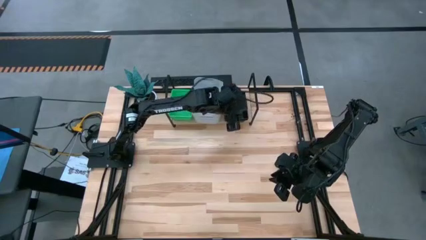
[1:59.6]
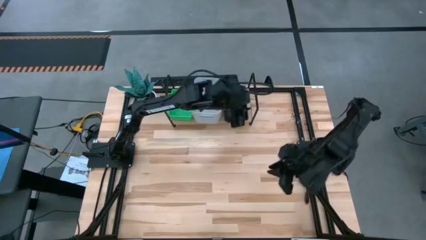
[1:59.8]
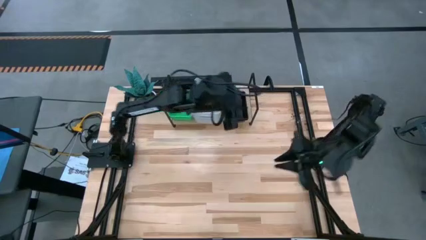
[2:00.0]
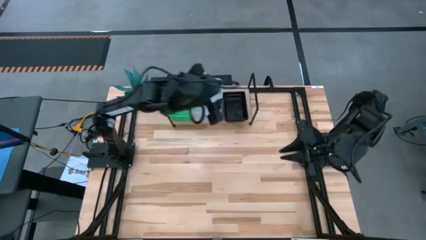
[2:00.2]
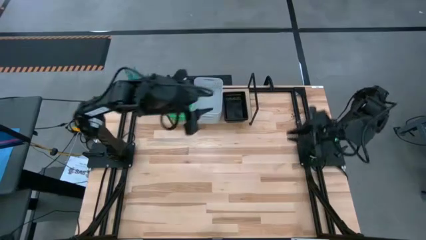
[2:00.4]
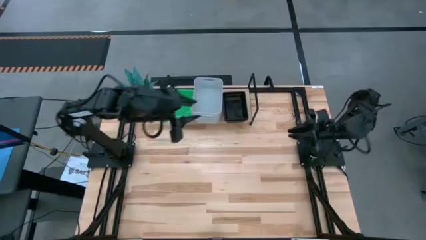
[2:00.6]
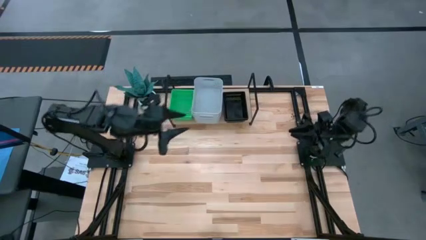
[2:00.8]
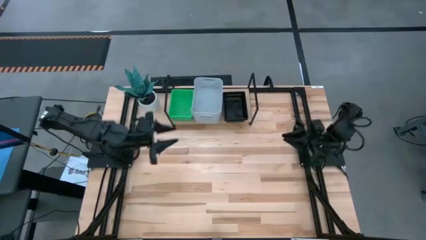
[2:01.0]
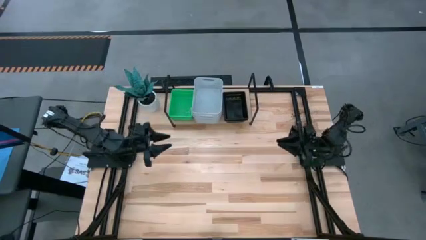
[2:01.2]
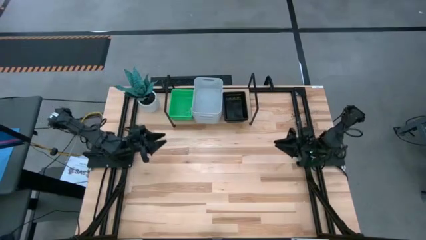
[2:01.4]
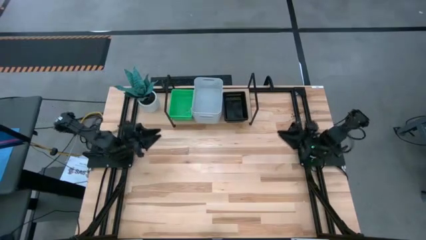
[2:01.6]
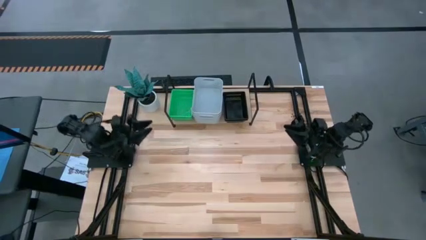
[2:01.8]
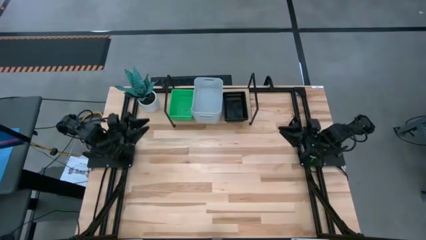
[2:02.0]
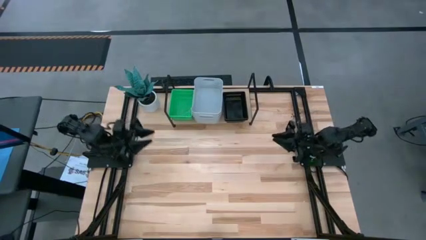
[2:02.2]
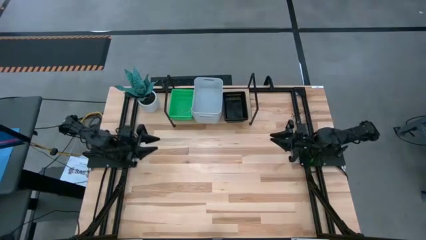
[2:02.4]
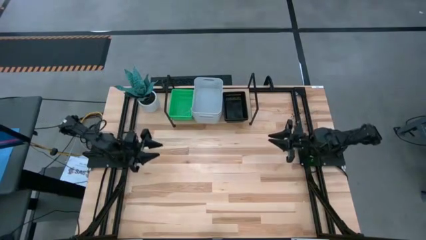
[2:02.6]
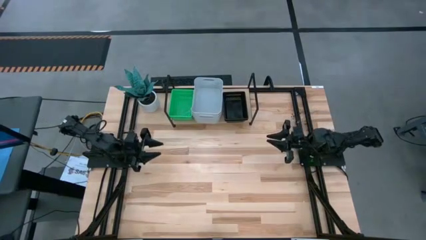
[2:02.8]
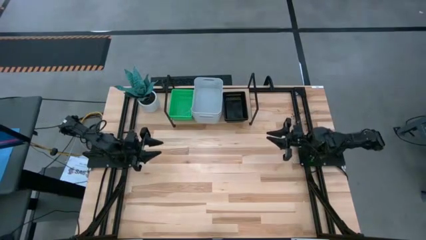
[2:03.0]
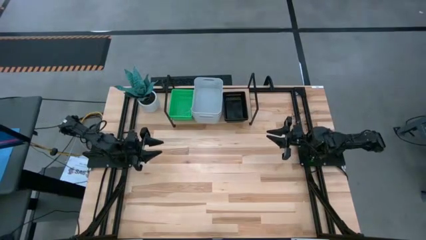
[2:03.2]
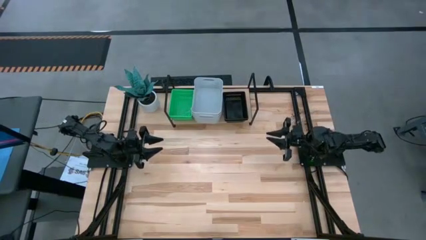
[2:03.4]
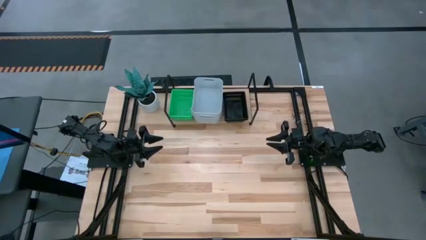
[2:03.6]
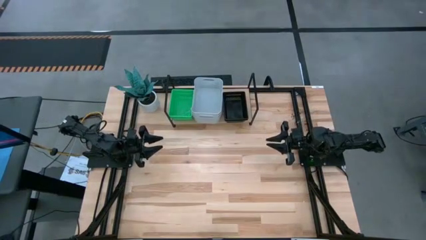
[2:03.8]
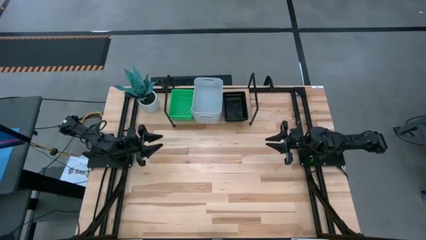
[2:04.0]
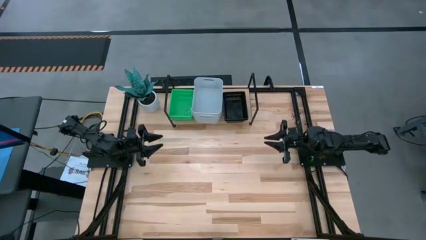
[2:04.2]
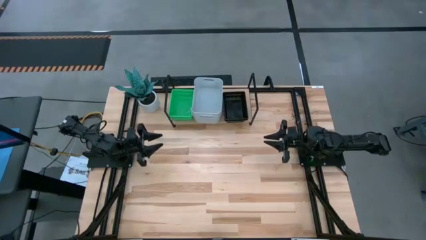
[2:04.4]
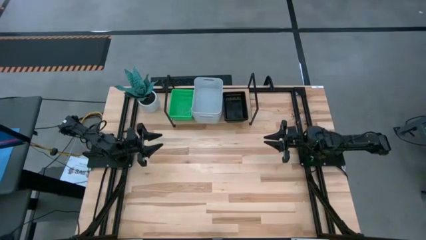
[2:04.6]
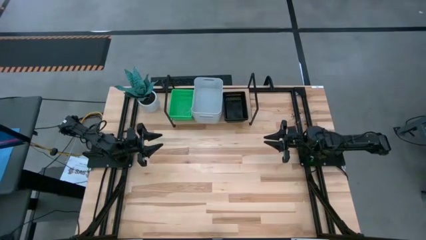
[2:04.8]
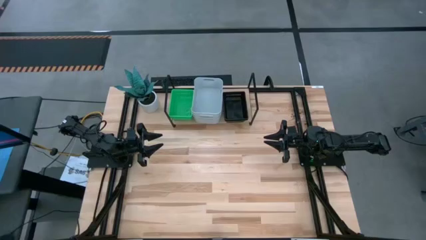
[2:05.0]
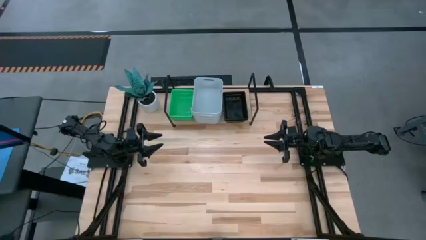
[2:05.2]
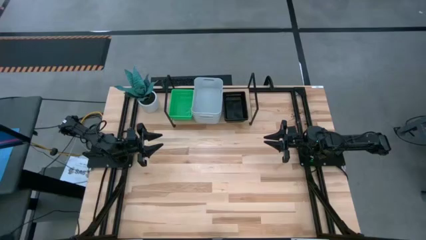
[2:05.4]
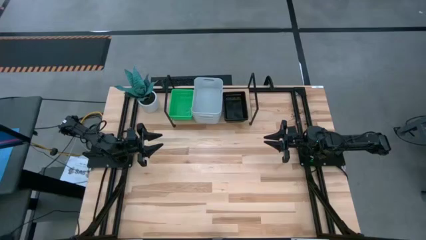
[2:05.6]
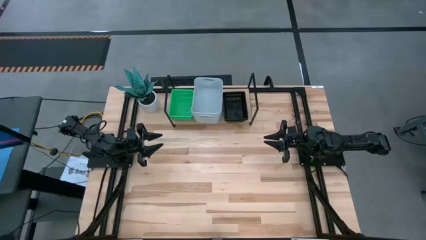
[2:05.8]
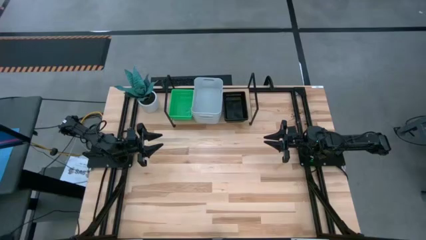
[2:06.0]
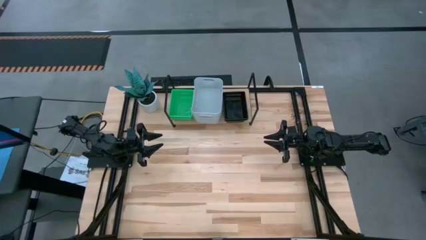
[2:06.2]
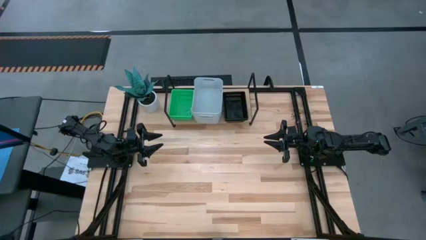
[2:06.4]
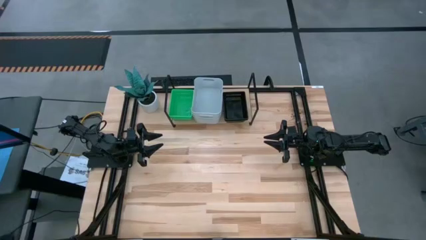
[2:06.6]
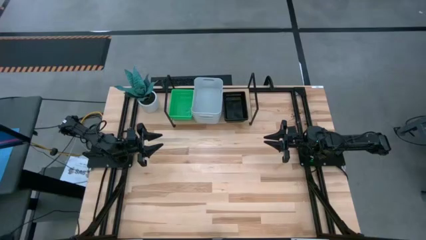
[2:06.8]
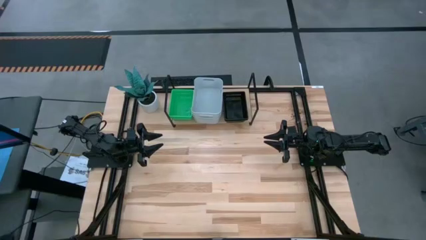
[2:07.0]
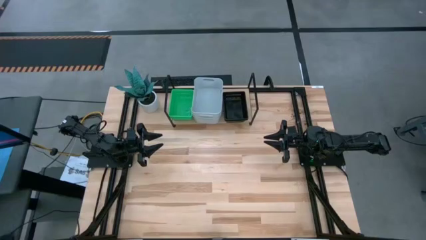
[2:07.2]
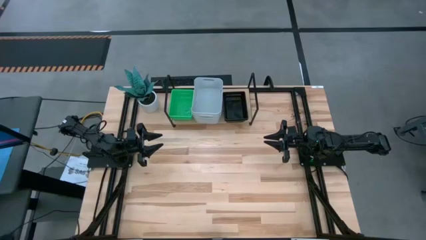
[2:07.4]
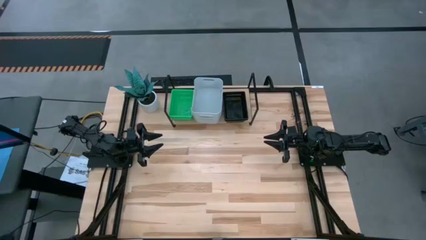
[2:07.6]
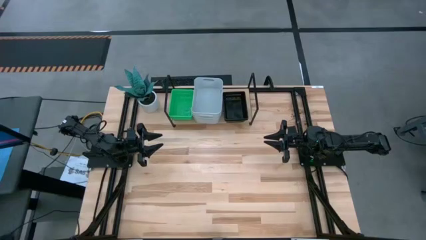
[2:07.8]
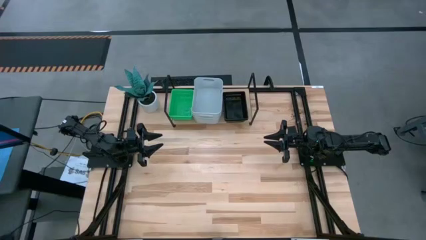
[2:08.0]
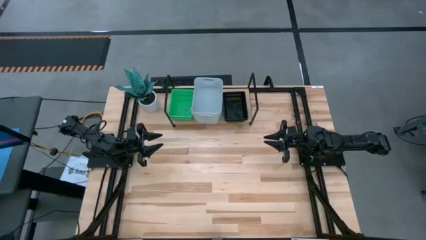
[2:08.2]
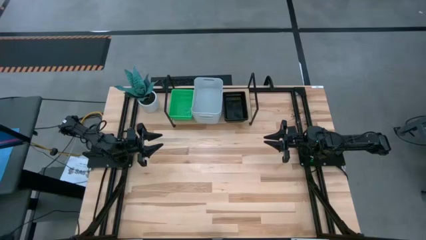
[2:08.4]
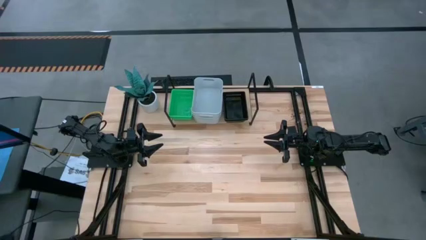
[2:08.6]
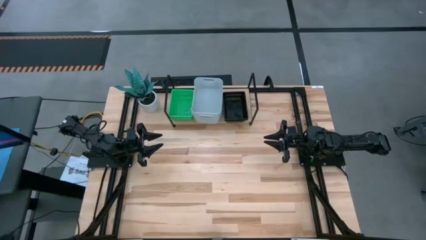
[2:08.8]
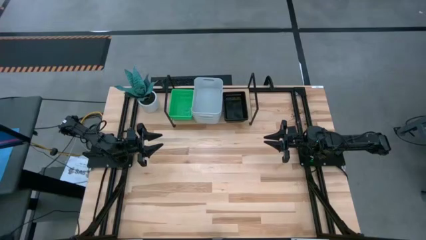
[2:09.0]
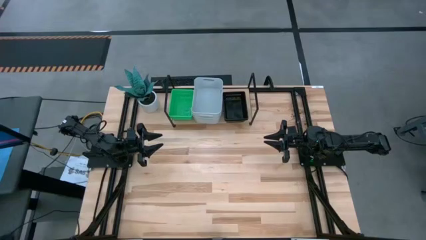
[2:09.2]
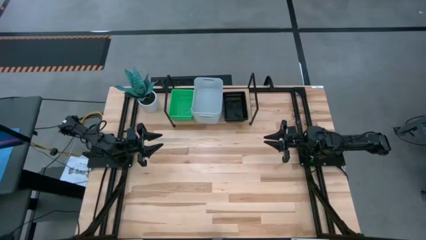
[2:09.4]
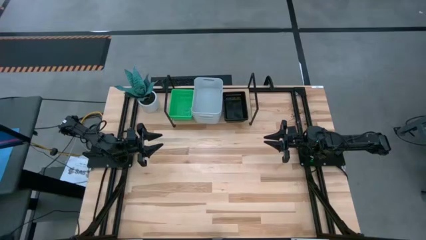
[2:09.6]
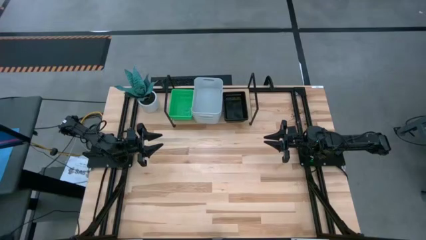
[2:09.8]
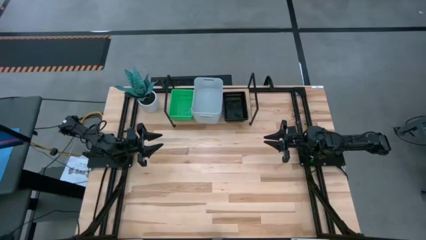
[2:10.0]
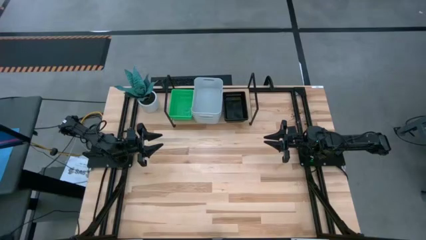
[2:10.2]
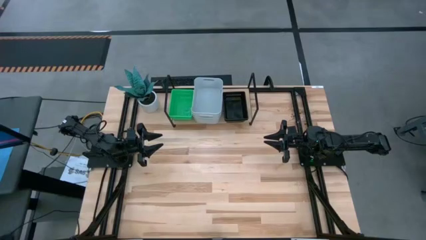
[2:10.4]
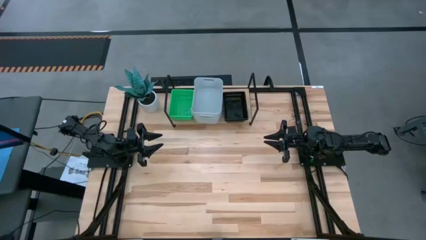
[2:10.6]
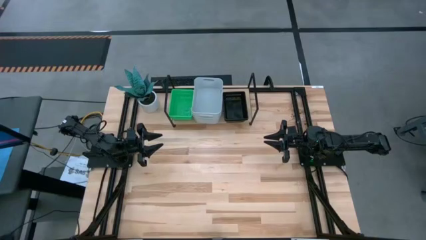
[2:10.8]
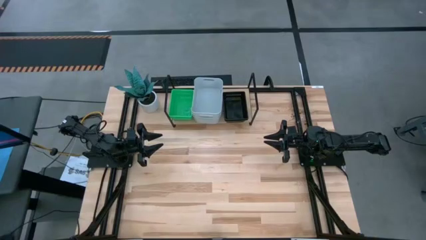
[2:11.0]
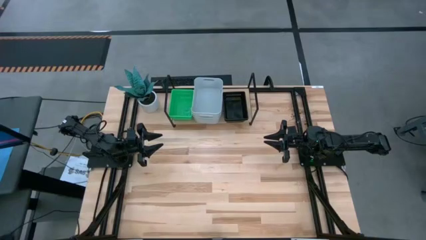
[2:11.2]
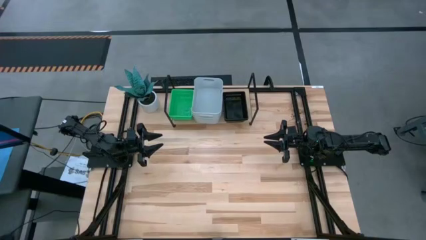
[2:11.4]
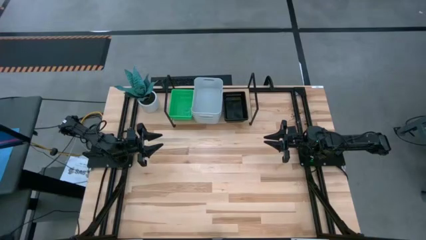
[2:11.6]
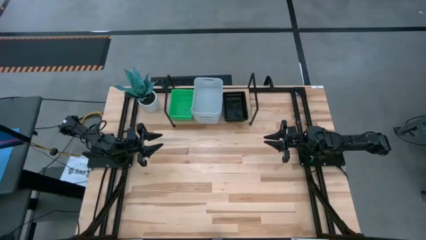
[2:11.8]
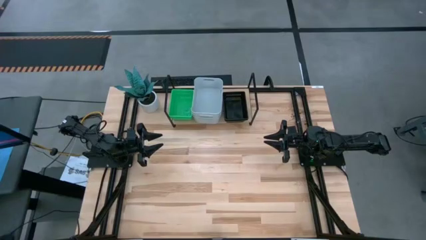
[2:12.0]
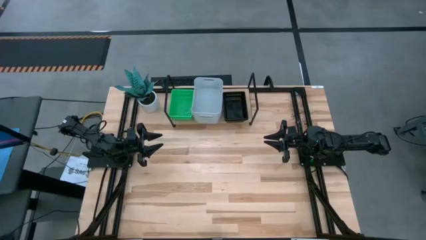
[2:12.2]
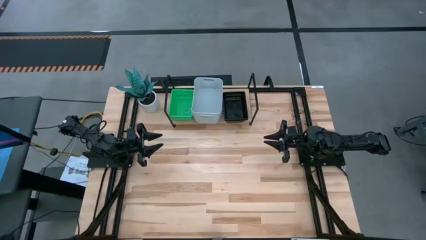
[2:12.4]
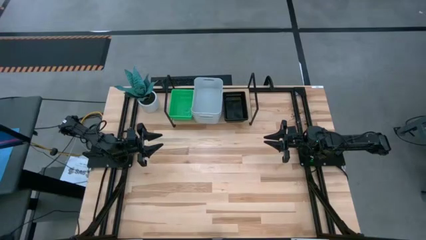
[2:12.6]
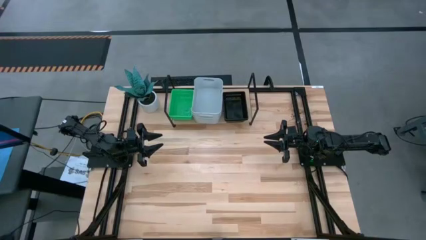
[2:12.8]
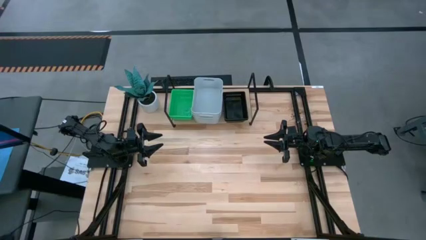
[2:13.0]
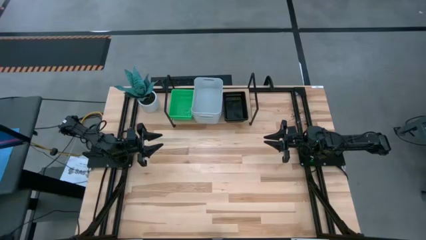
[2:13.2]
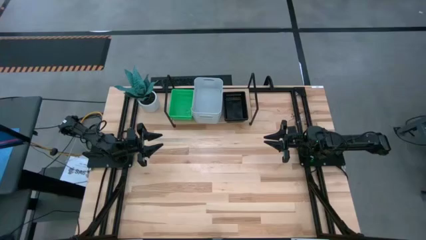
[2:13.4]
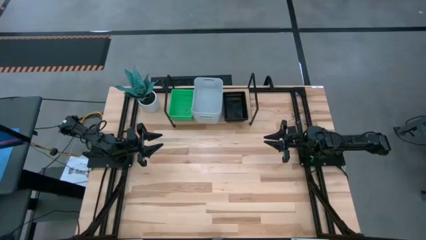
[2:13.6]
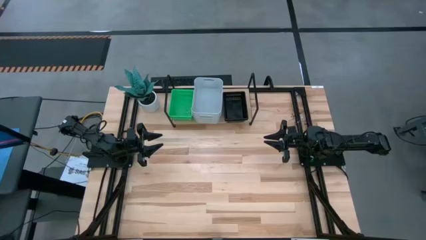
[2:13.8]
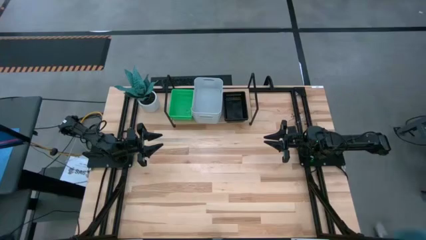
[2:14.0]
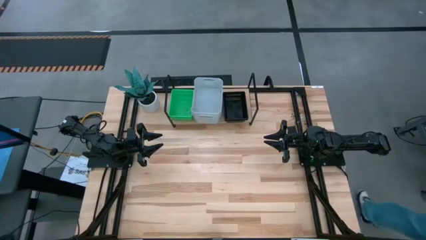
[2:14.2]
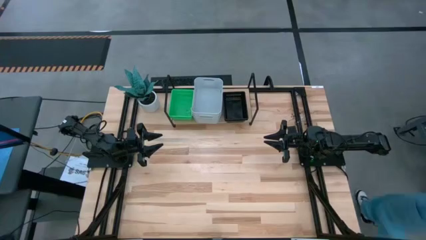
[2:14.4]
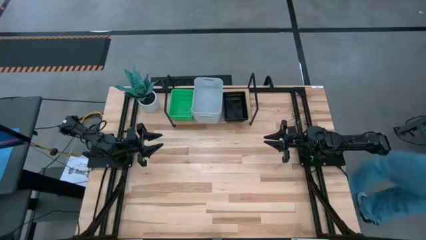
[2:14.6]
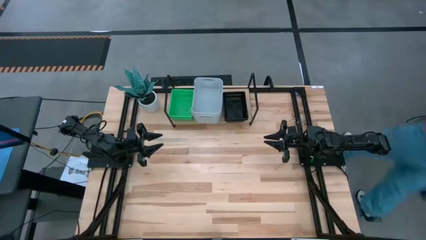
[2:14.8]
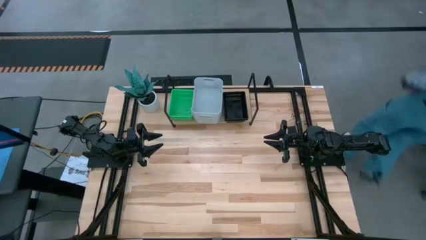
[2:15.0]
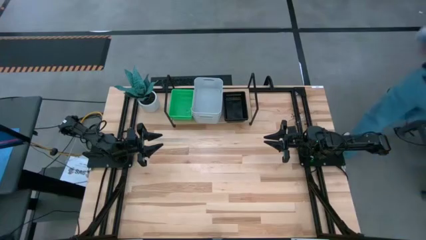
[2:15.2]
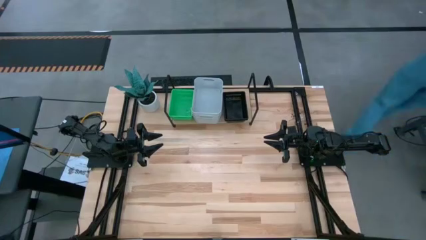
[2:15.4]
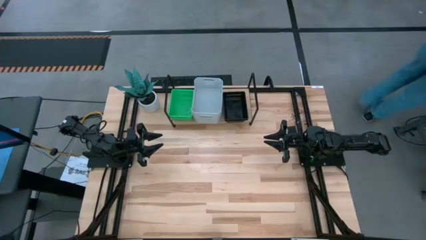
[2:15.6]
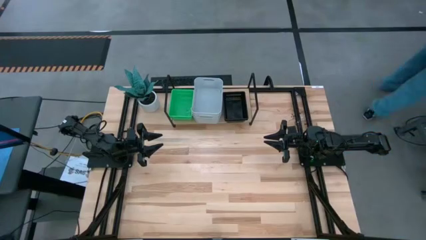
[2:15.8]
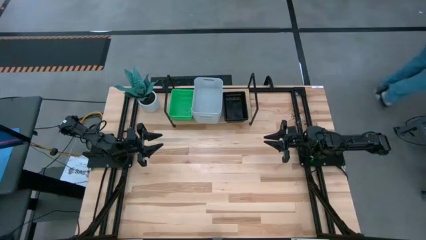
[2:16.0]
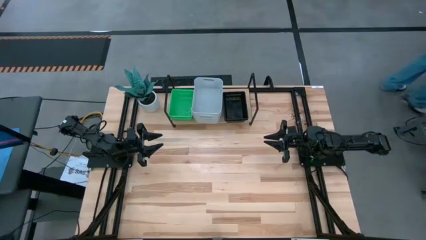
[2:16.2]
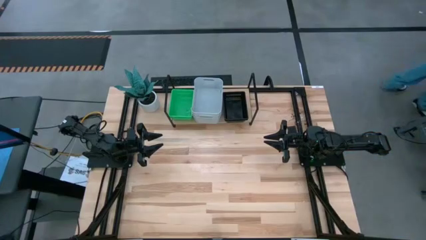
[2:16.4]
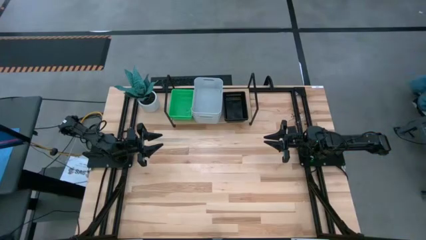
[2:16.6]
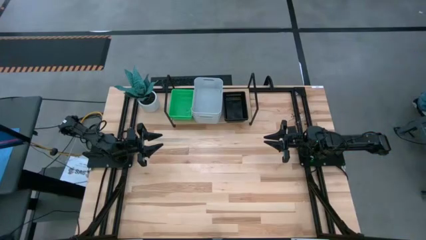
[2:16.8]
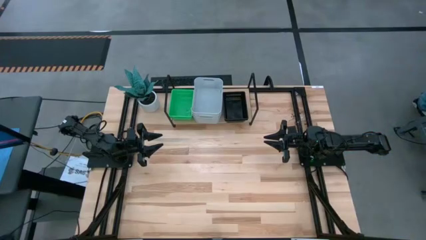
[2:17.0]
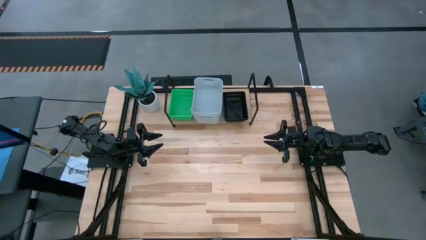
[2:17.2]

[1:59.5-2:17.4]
Task: Stack baskets on shelf by color
Return to Home Position
